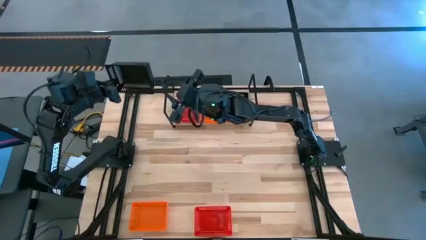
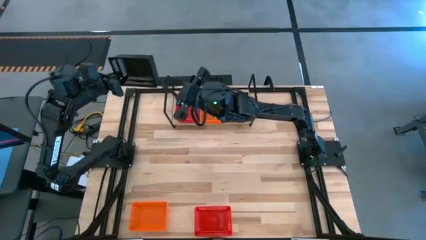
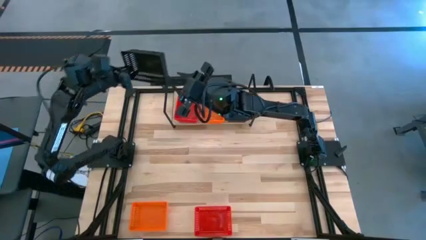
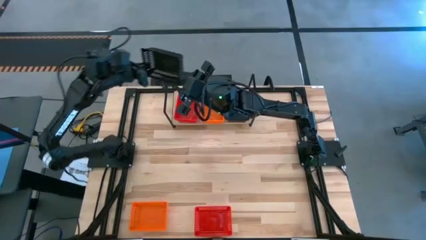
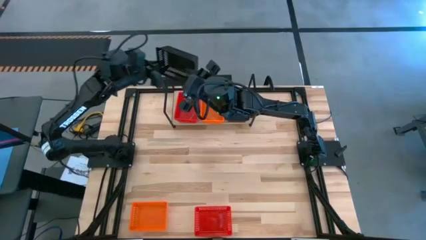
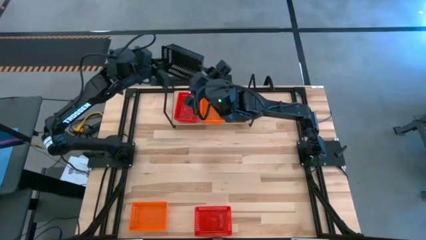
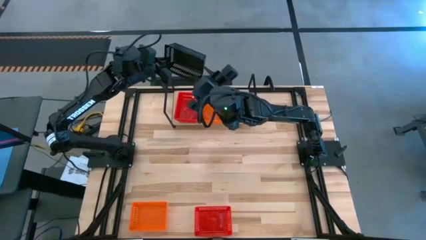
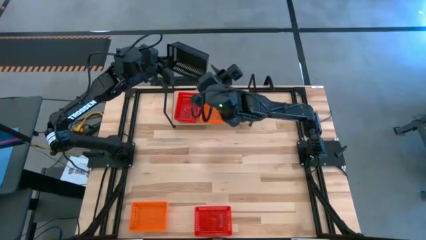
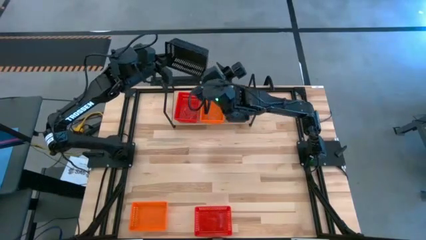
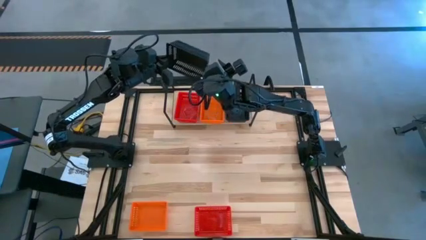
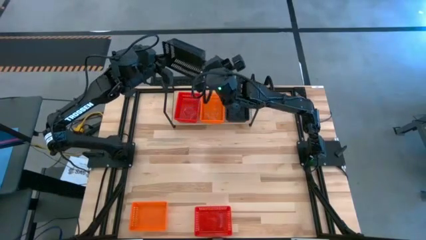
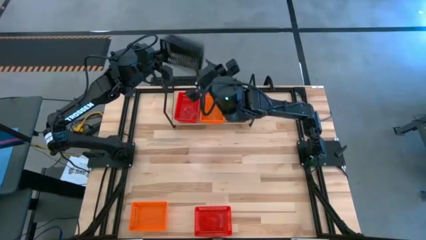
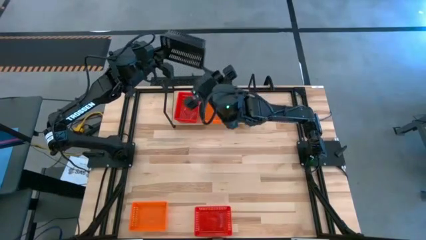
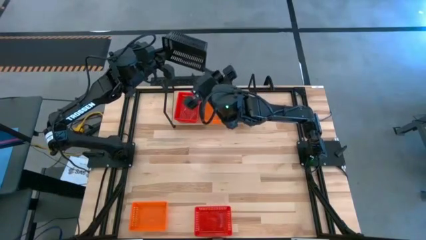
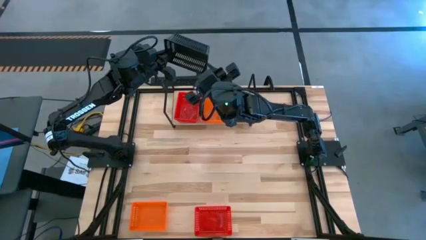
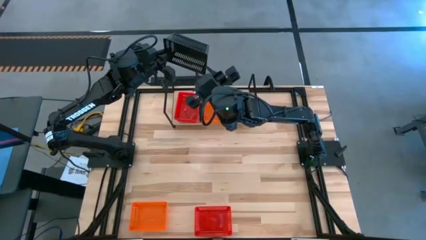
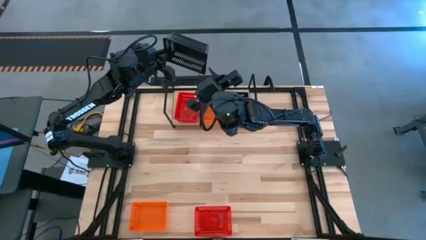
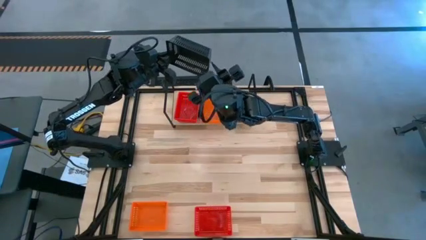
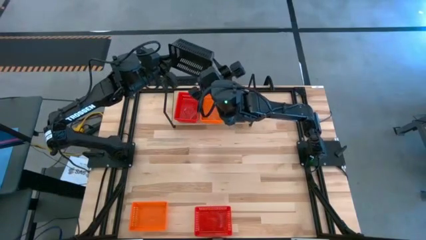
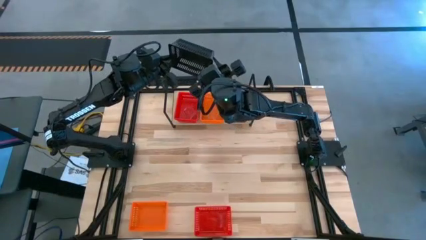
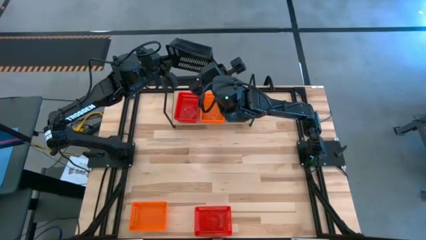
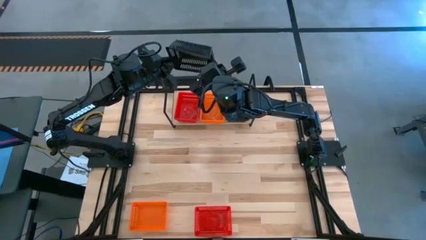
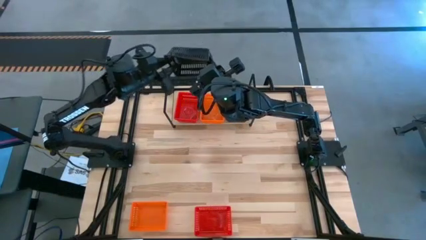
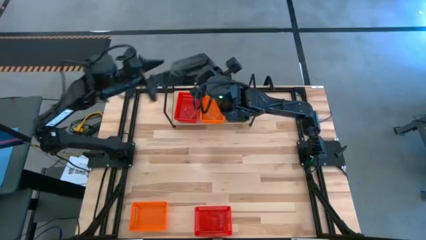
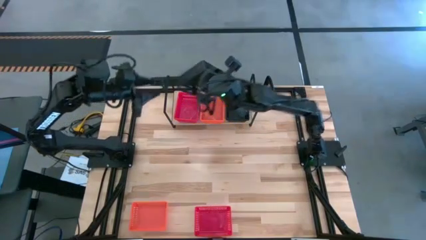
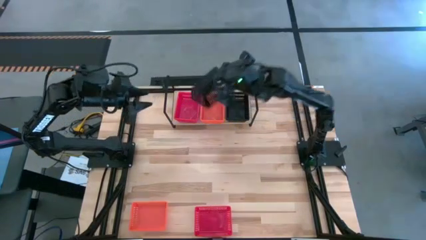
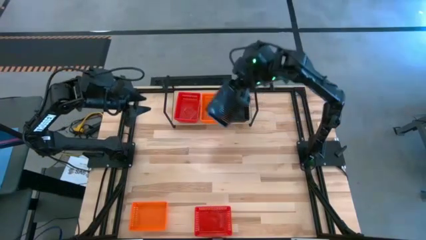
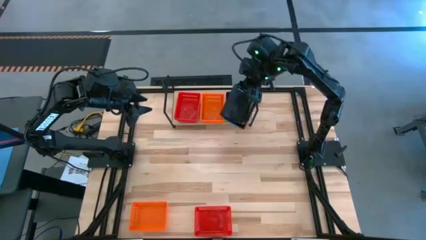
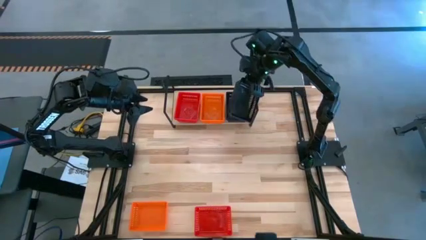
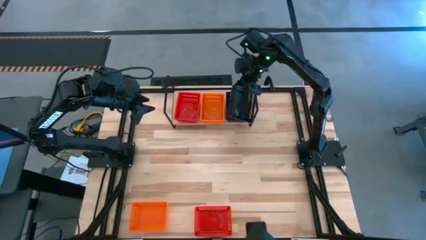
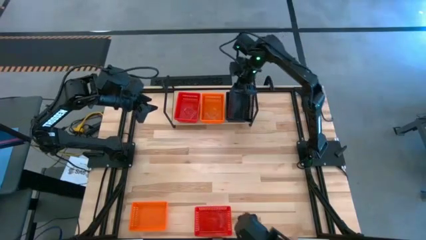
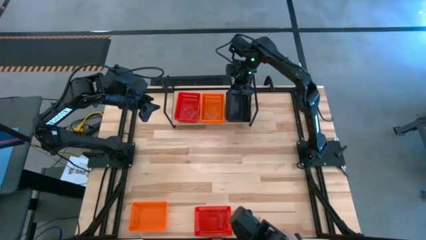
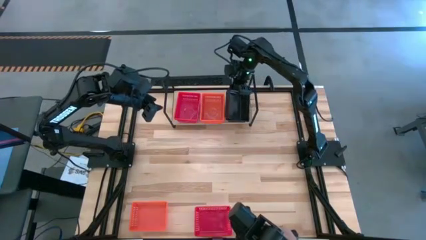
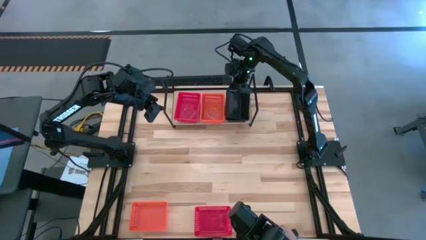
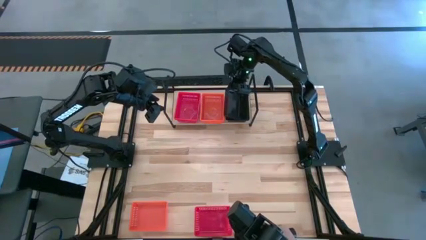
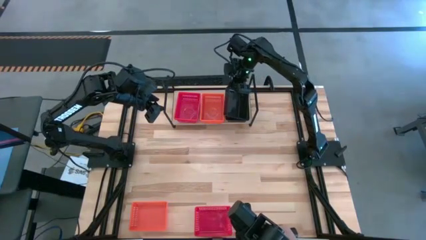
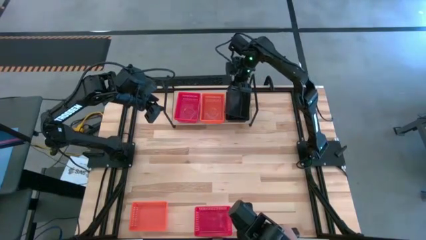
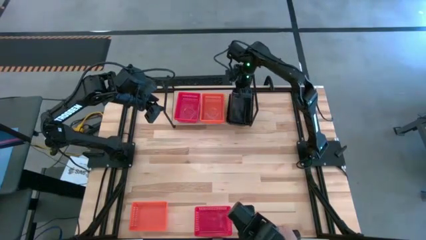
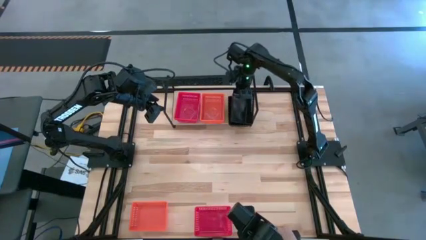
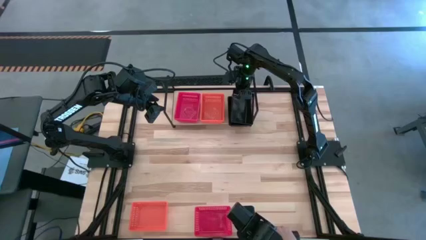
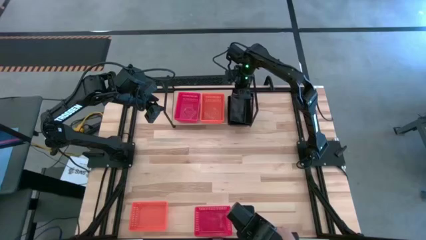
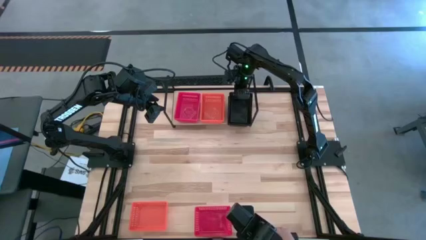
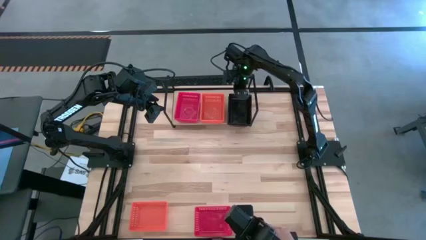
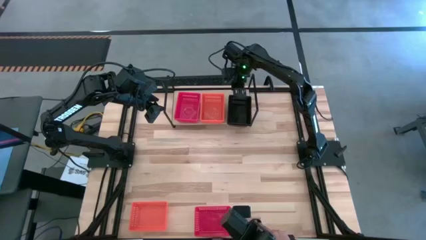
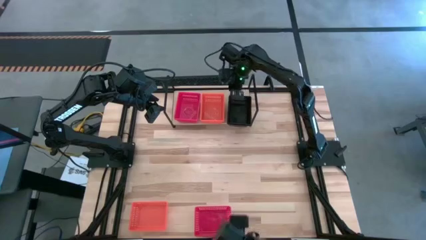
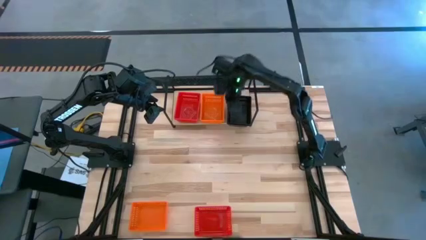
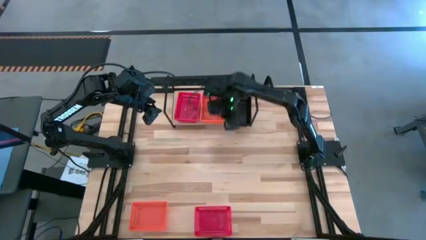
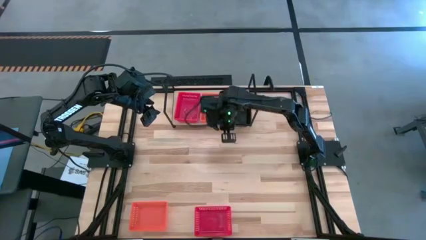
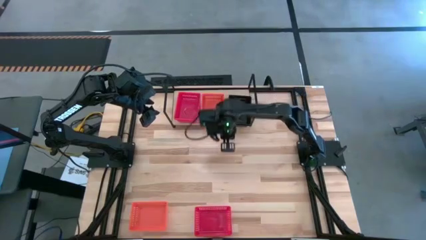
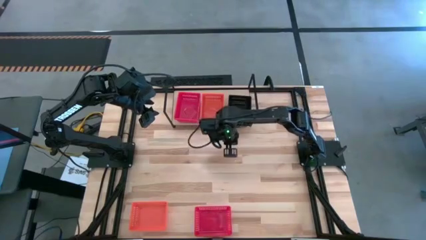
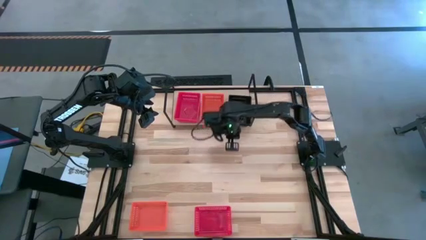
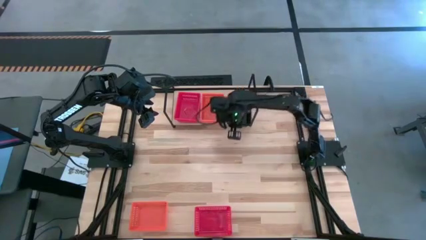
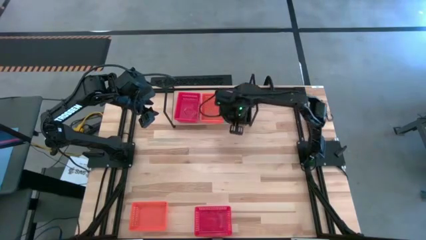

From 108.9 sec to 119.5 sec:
Task: Stack baskets on shelf by color
Stack the black bin on top of the black bin on the shelf

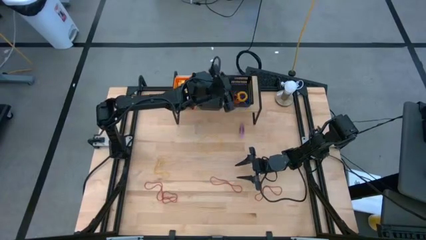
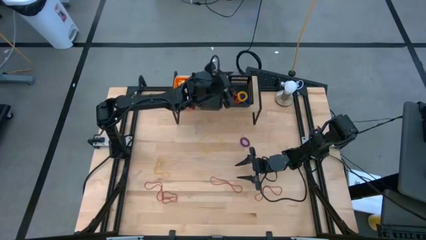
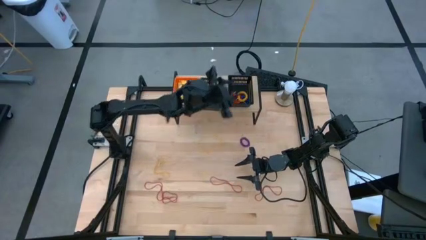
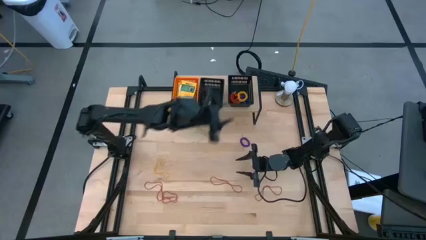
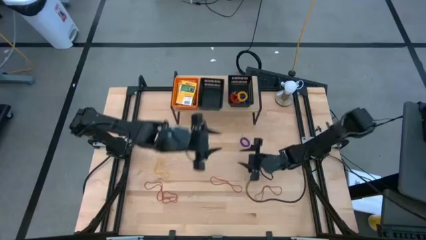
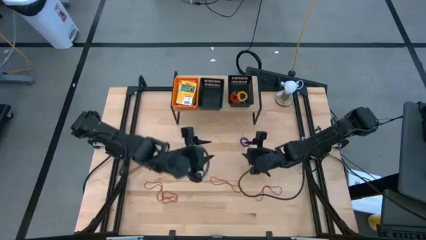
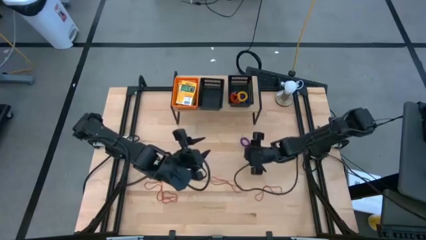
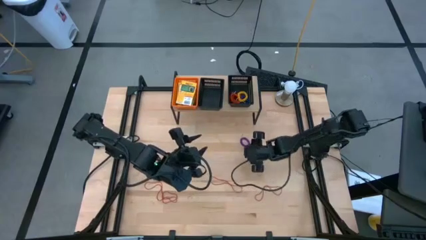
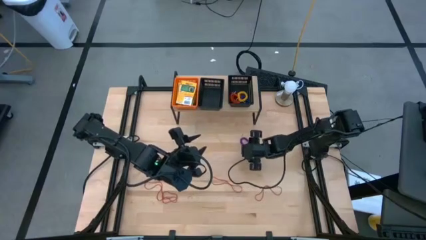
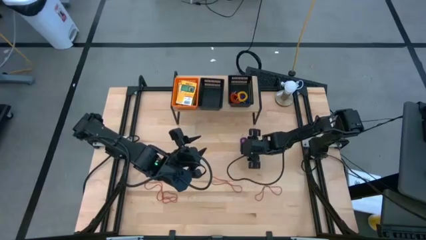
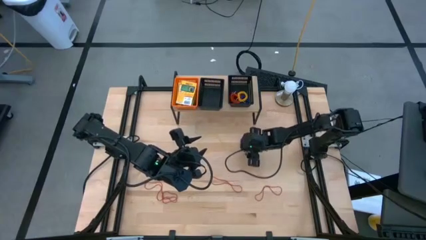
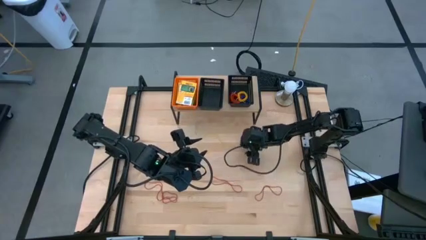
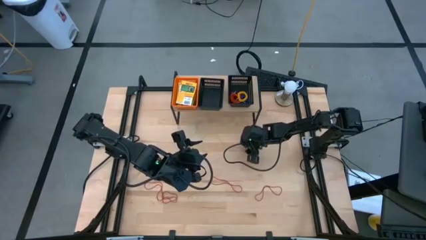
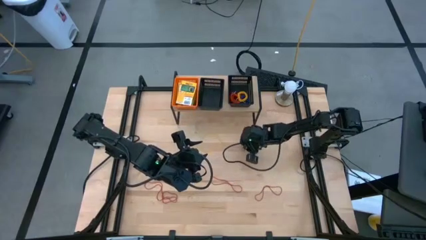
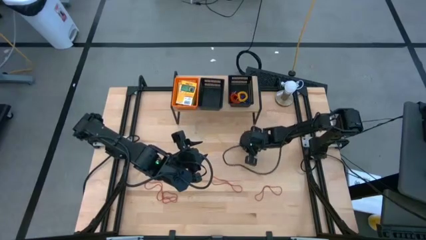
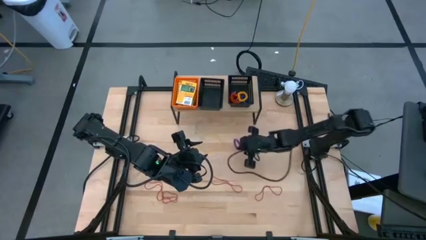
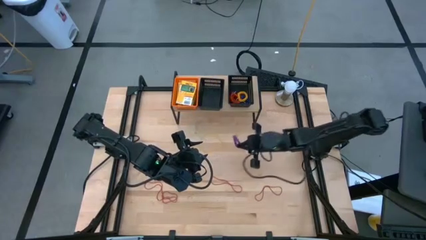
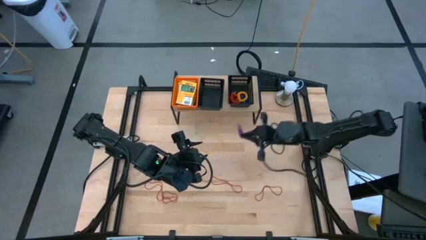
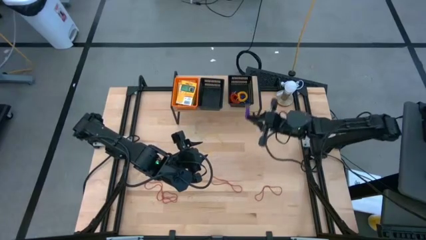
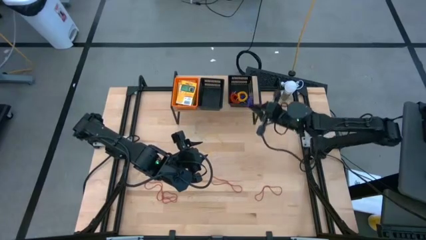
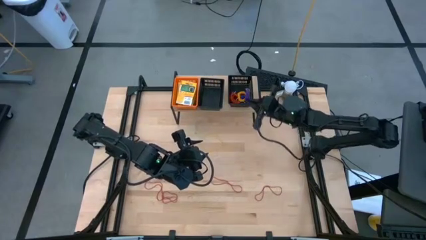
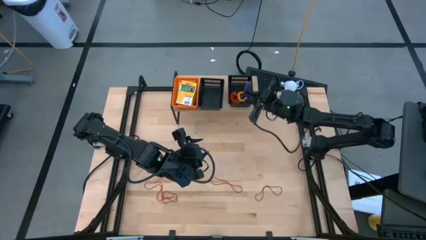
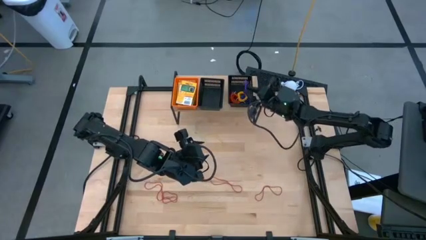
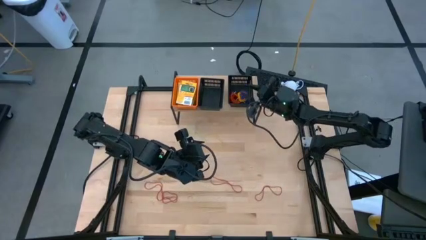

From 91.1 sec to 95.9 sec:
Task: Pick & Place Office Desk Supplies
Put the violet spring keychain into the right black bin on the shelf
